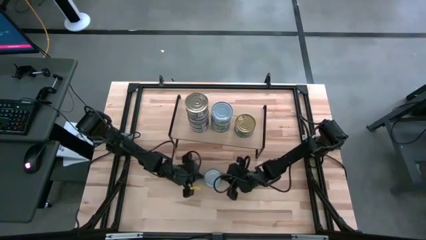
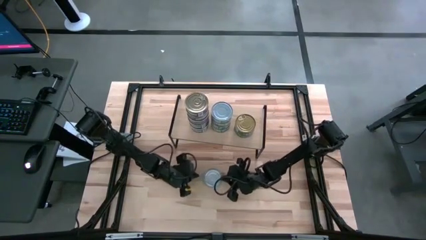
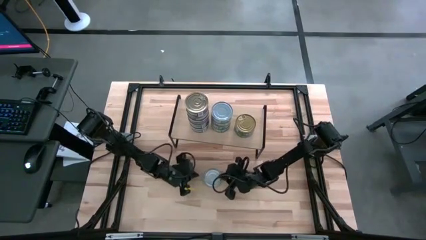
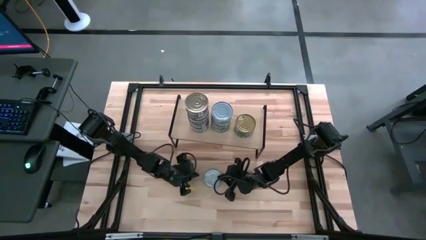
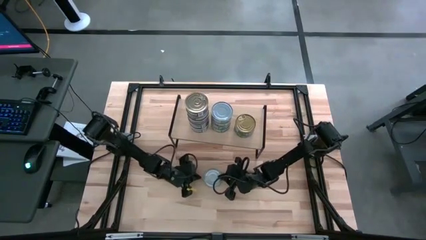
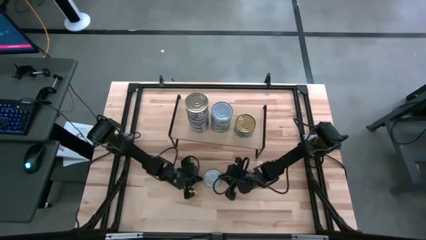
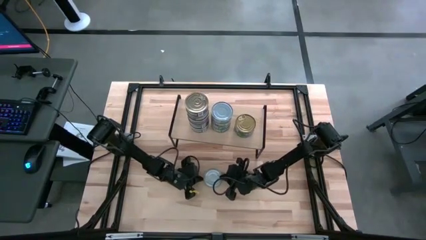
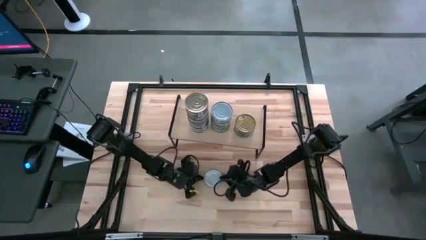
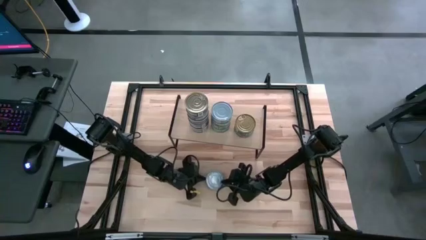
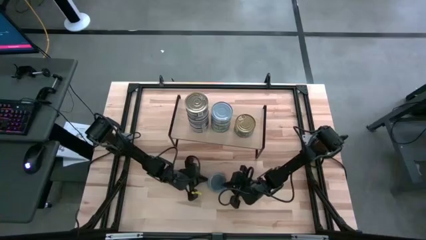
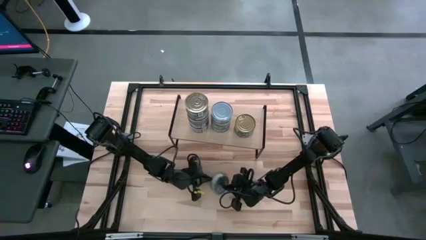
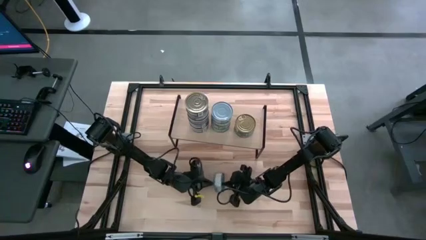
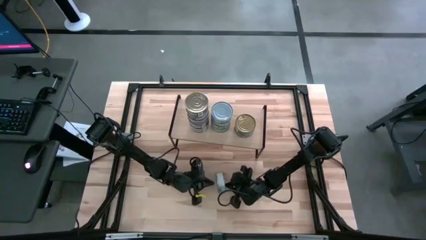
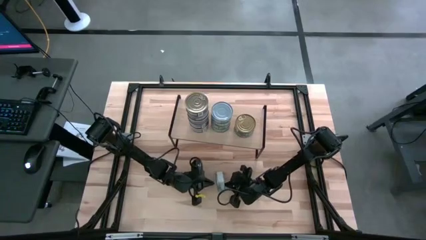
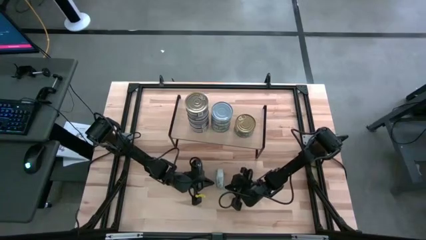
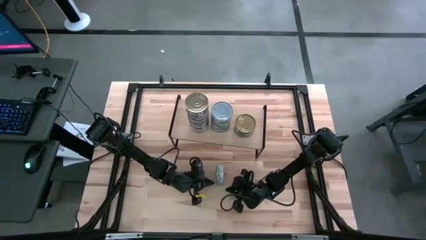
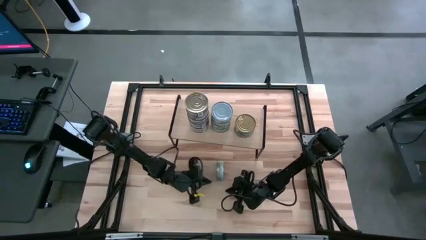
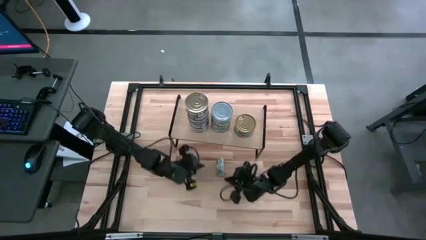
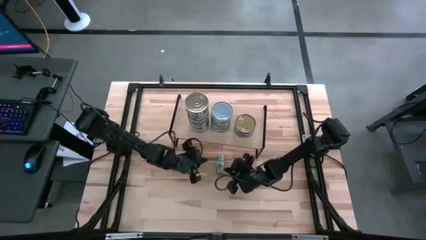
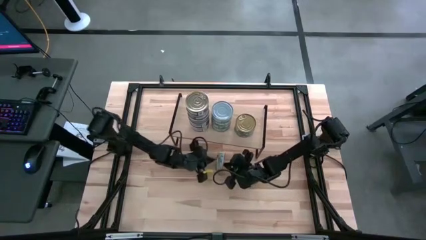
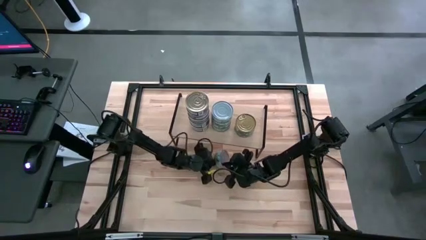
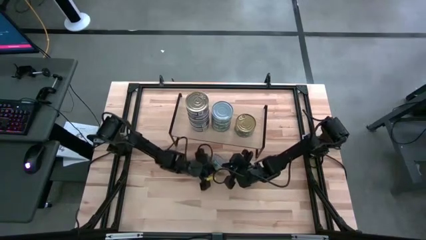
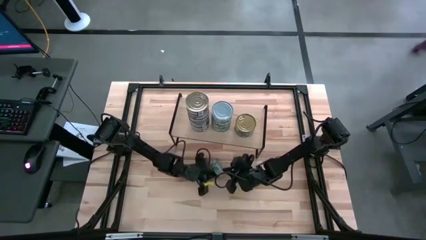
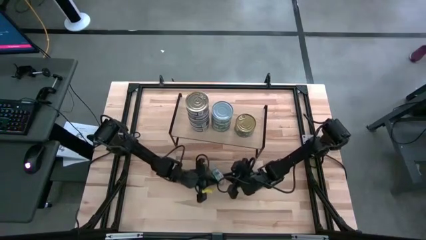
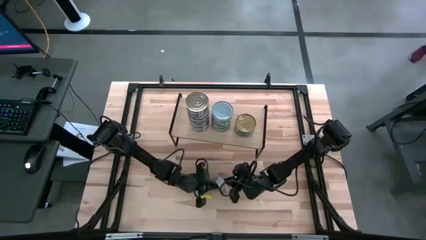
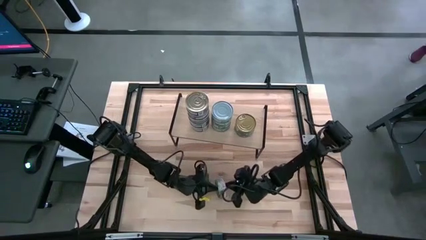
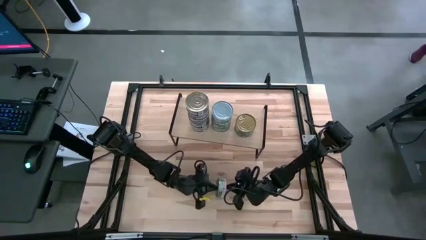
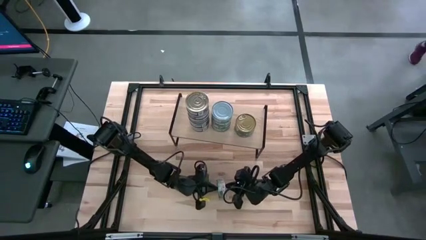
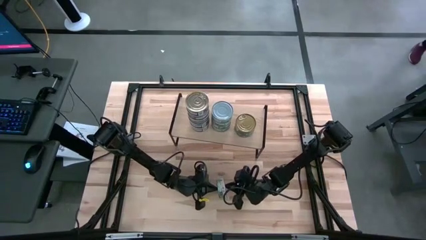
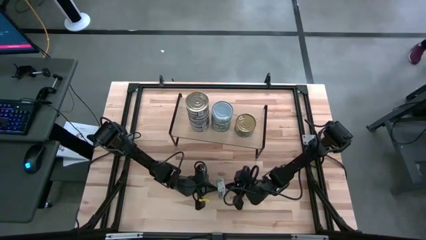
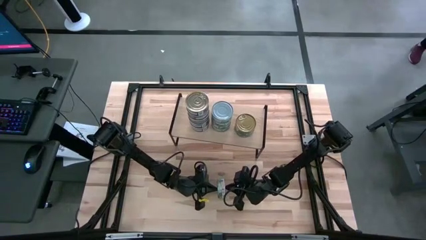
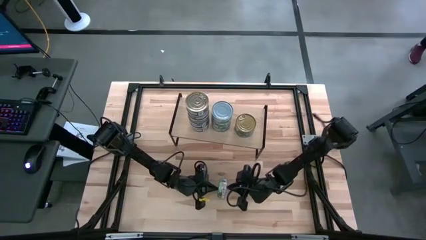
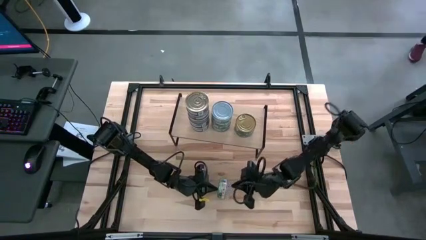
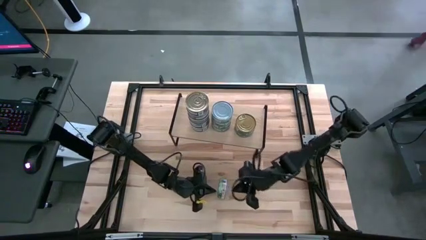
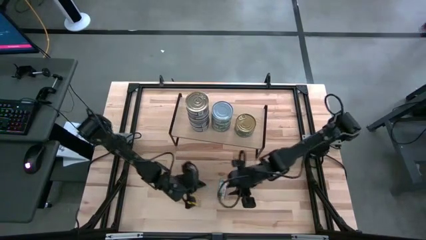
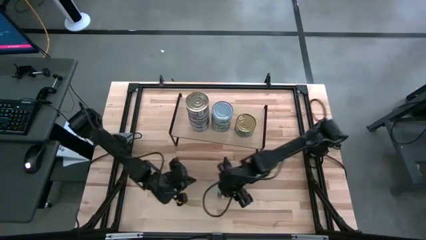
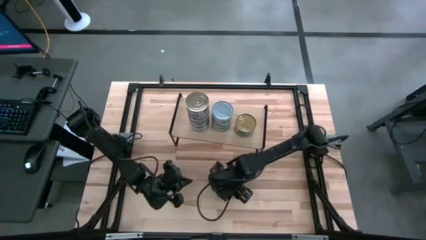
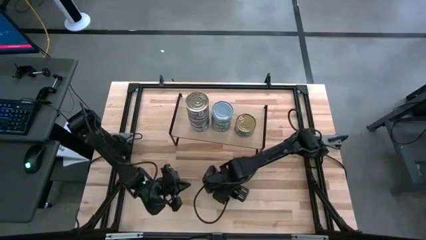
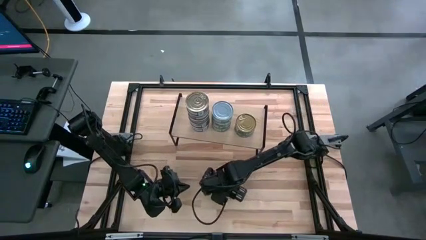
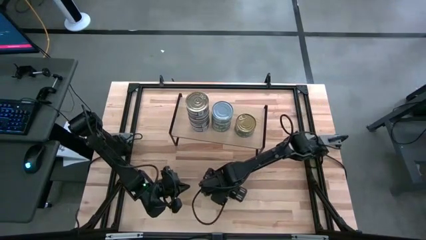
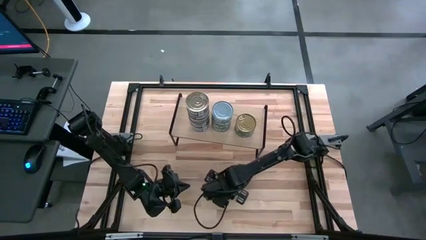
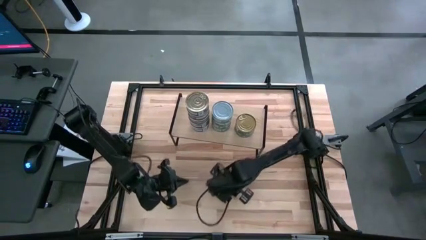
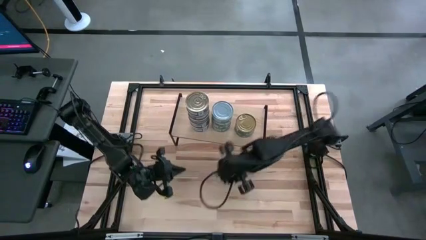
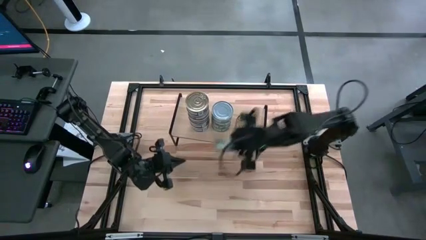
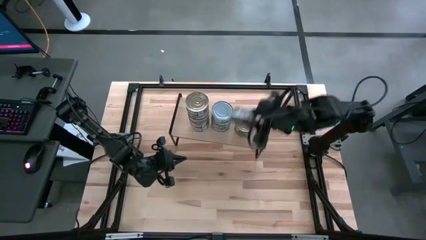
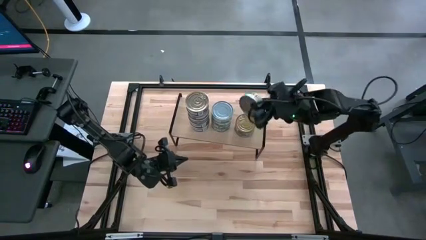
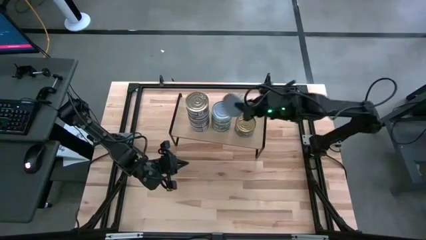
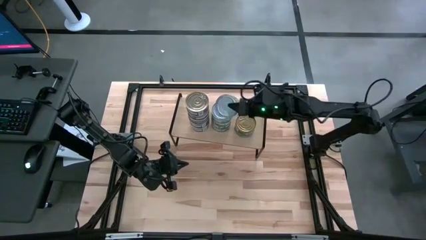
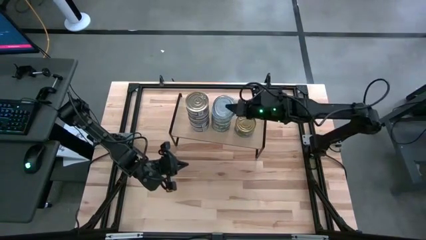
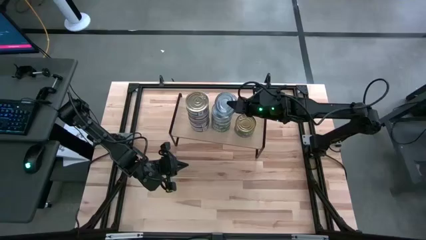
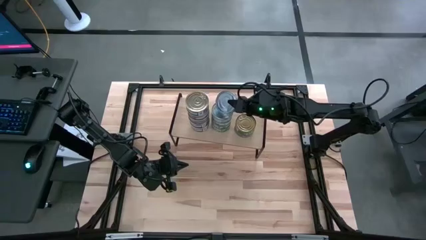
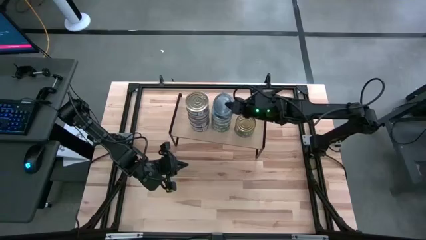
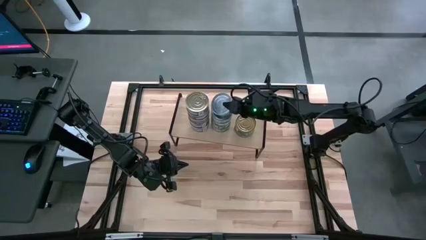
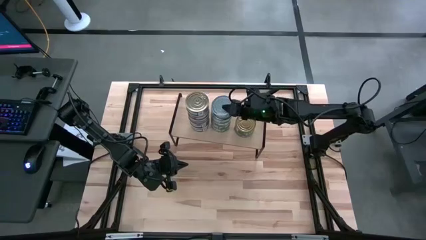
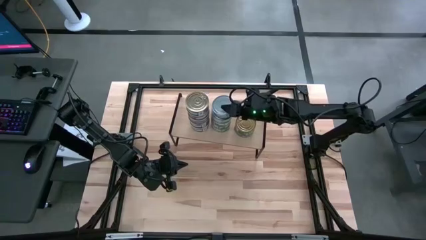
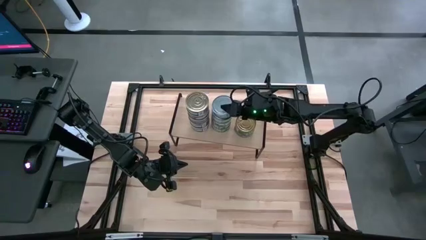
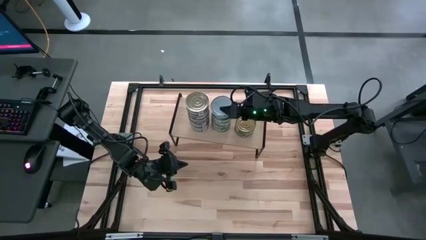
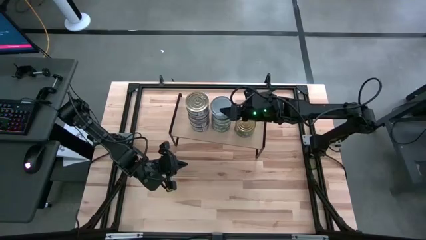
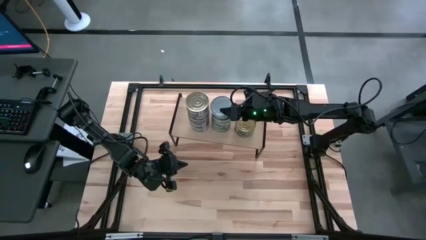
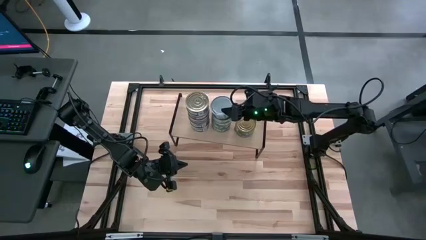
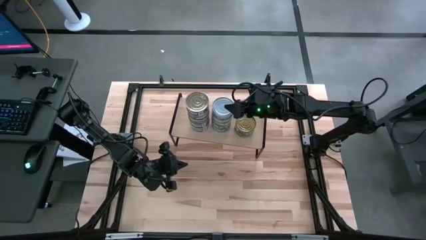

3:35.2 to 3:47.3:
Task: Stack canned seafood by type on shelf
Stack the white-green tuna can on top of the white-green tuna can on the shelf

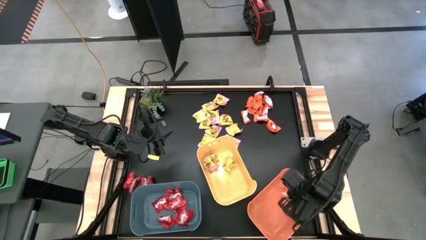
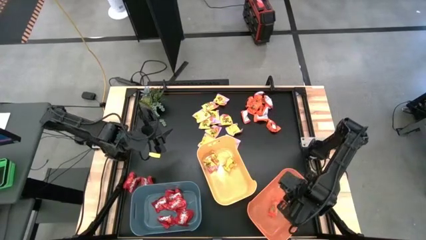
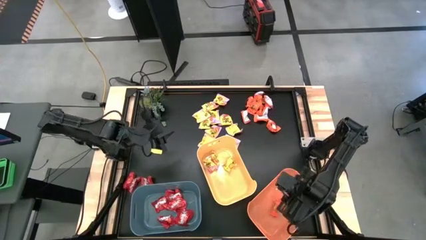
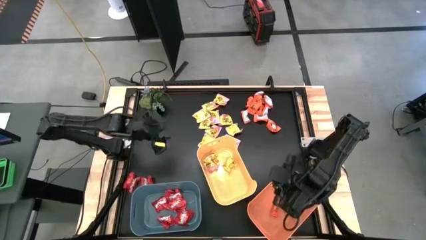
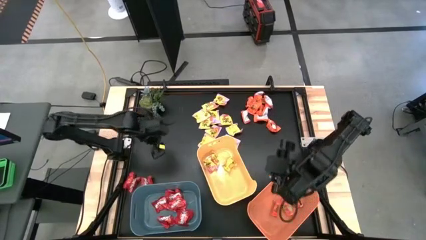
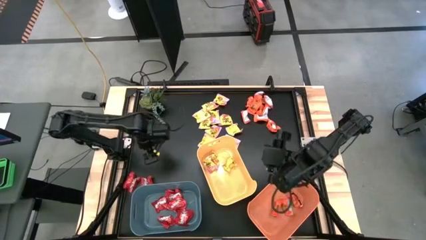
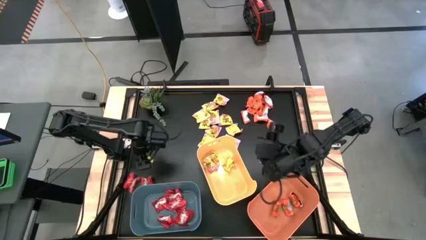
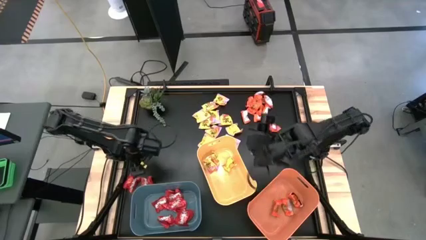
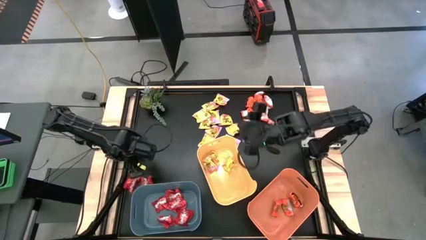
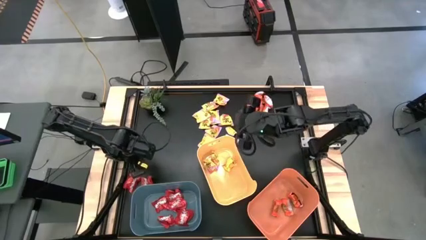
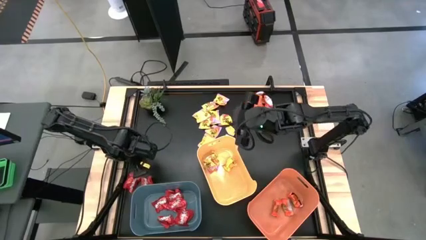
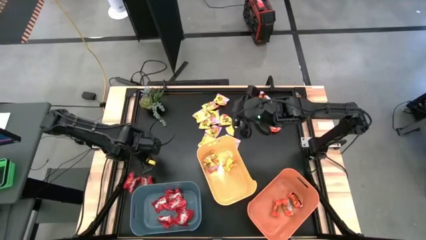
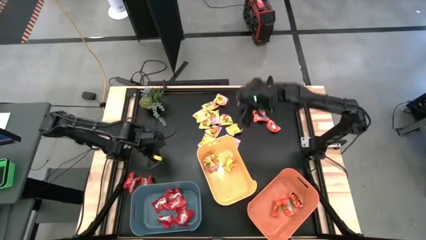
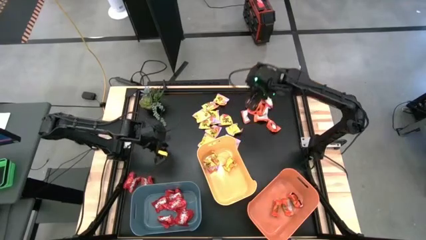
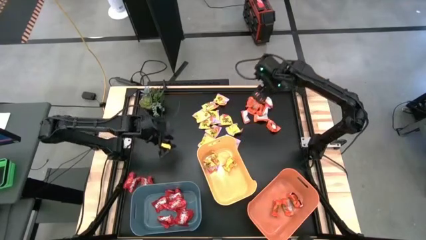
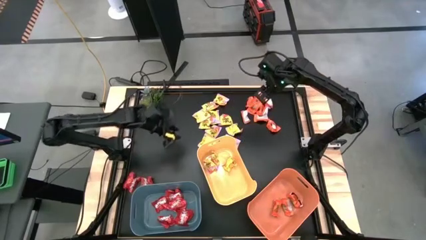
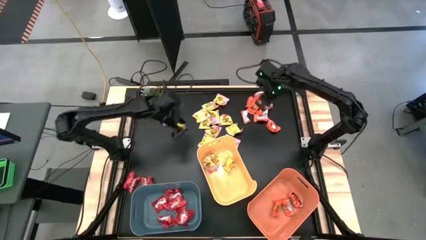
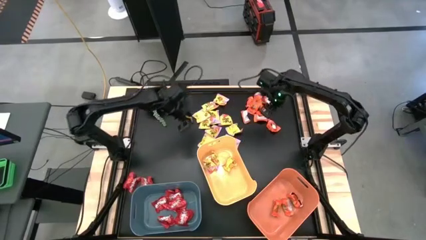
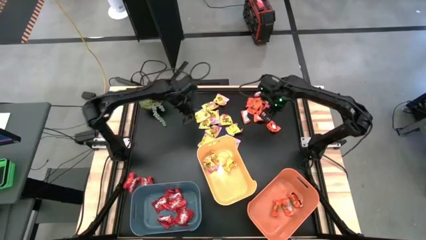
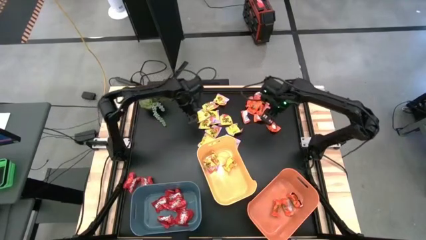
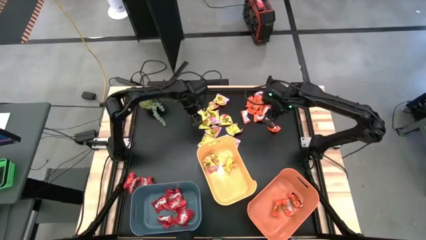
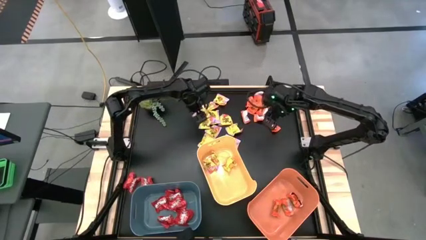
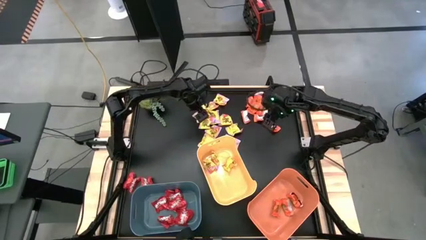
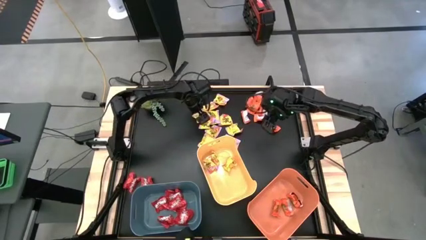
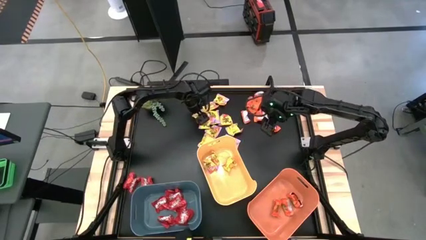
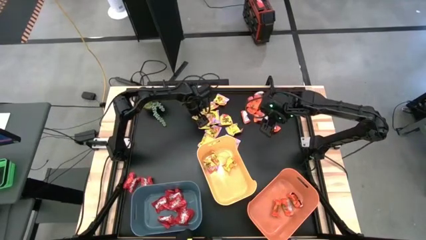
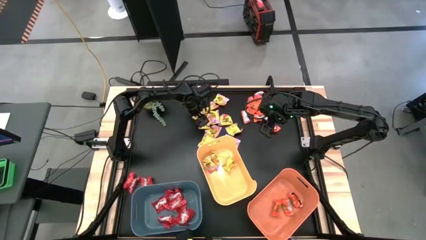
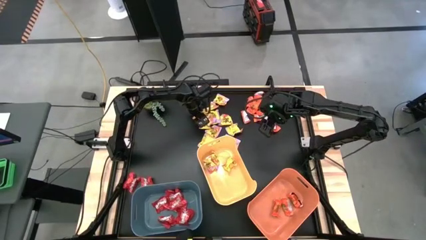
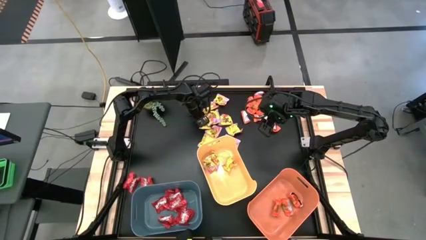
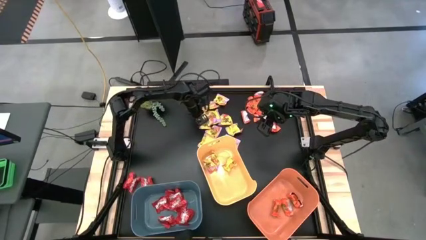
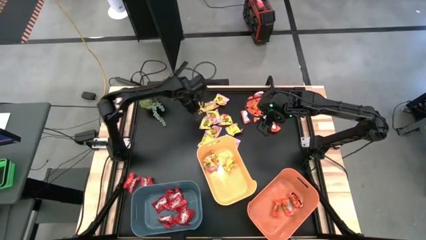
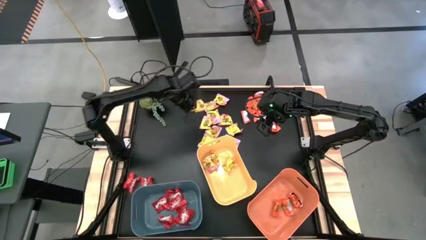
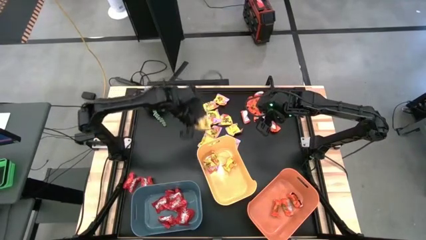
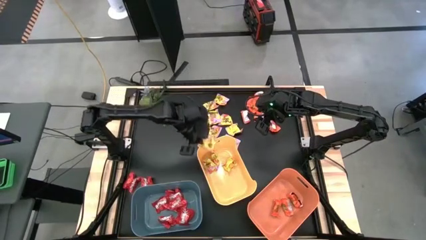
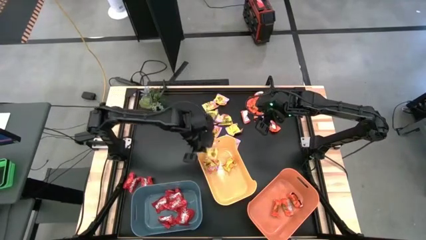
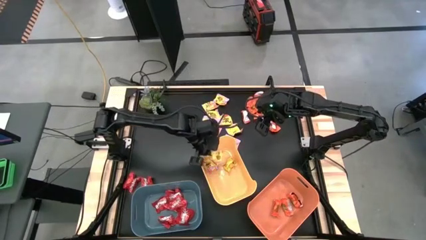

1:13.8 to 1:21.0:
Task: Sort candy
Put the yellow chocolate into the orange bin
